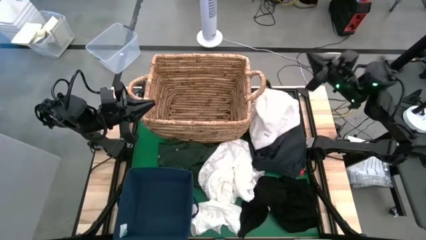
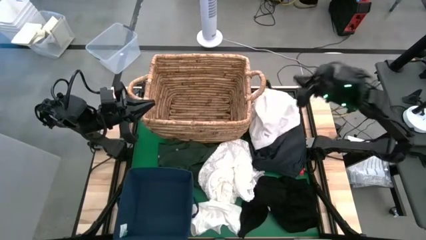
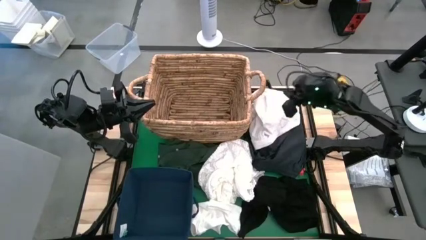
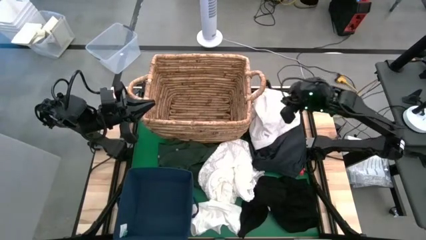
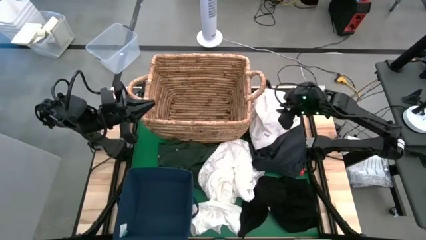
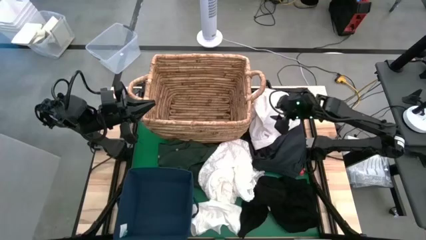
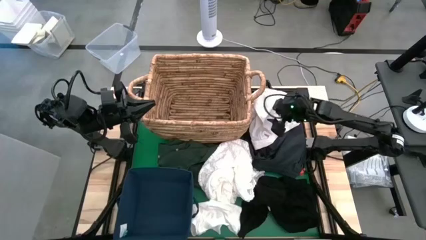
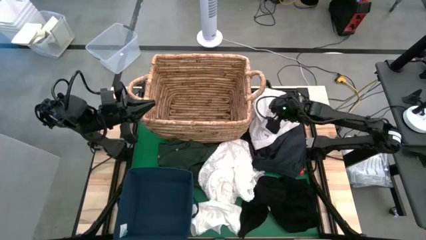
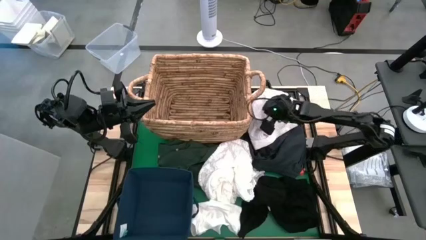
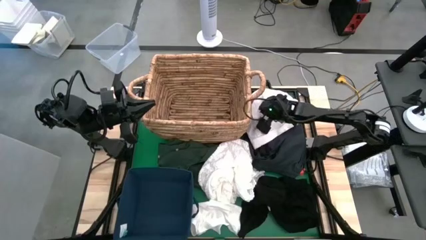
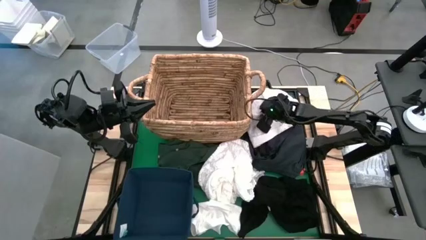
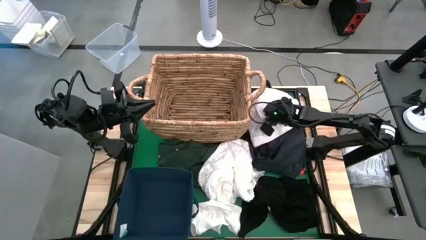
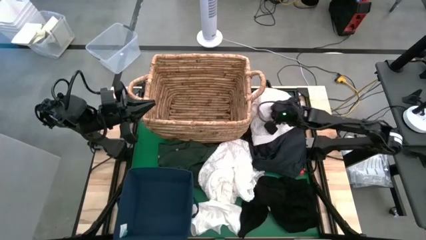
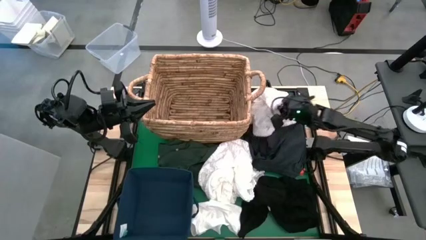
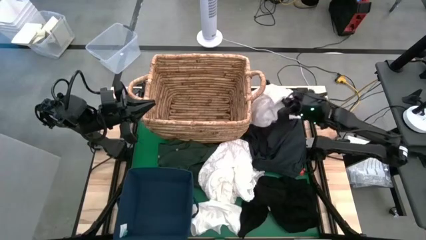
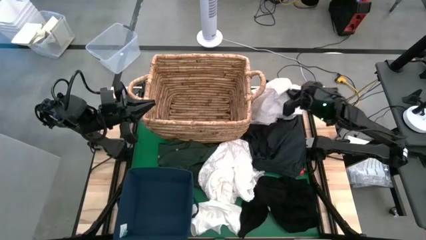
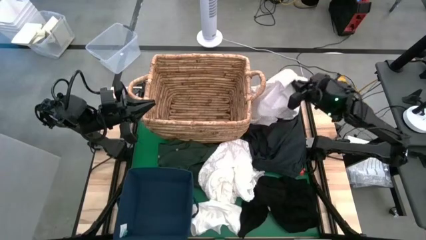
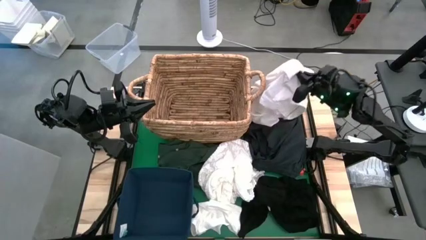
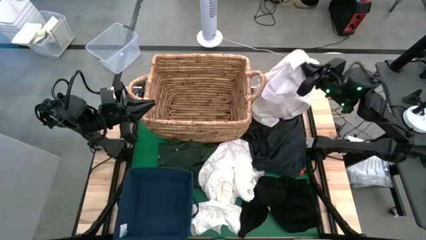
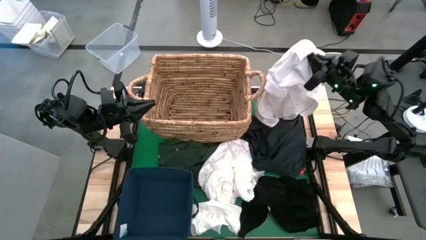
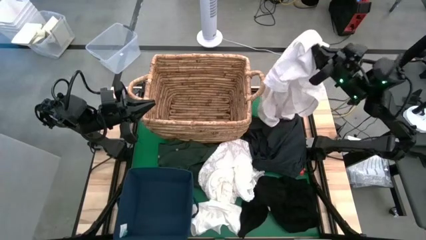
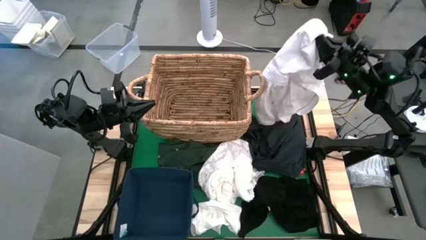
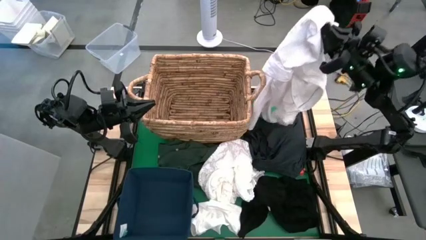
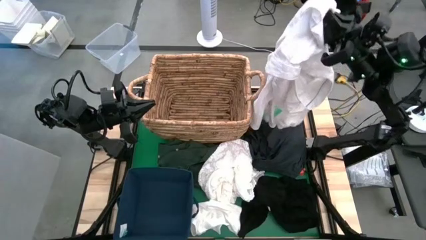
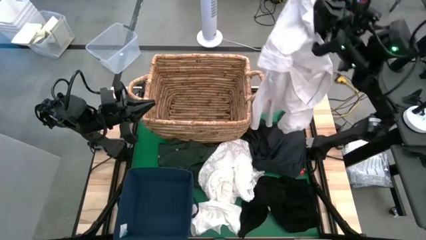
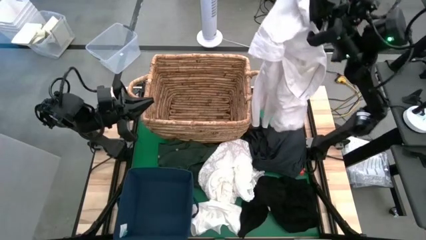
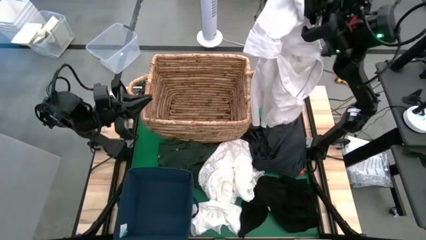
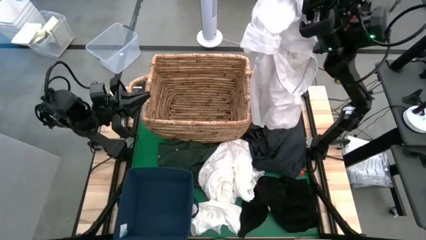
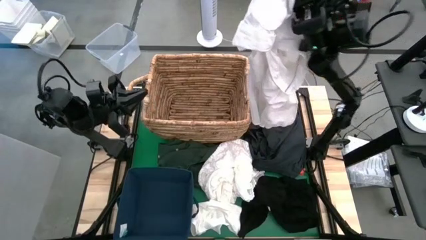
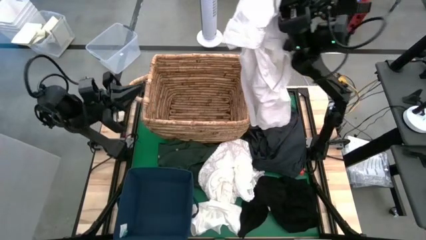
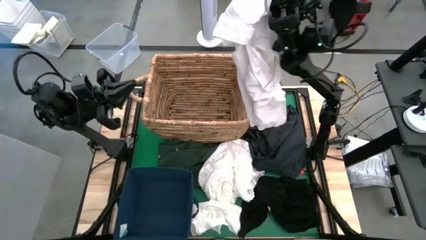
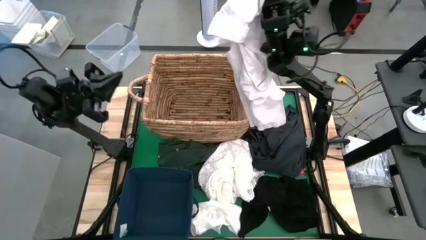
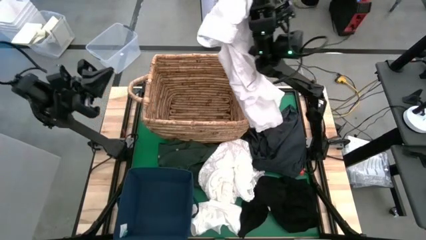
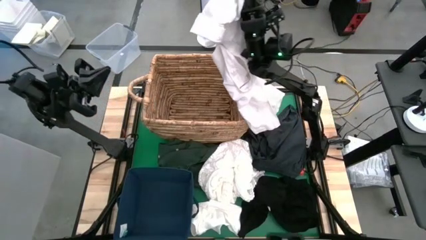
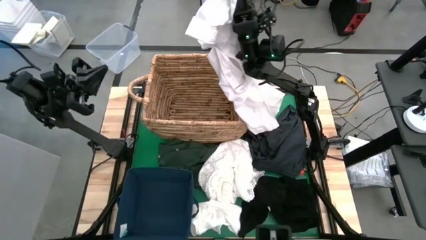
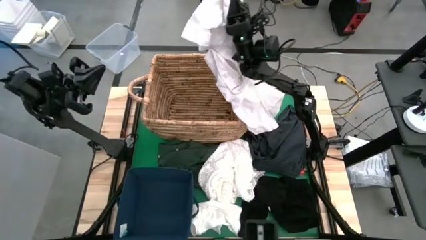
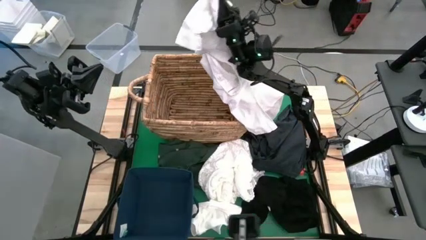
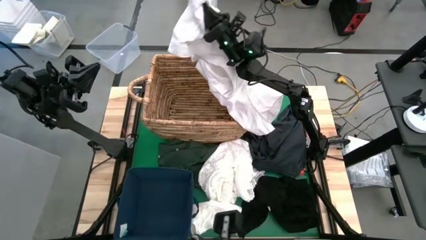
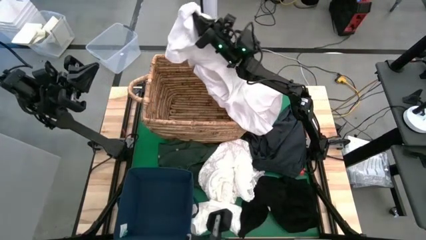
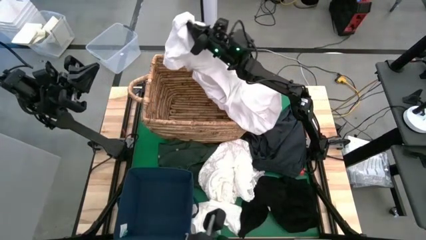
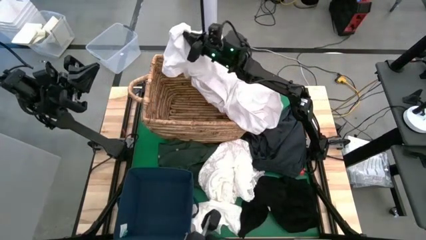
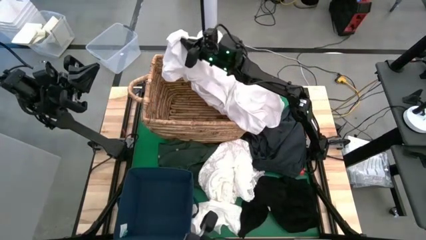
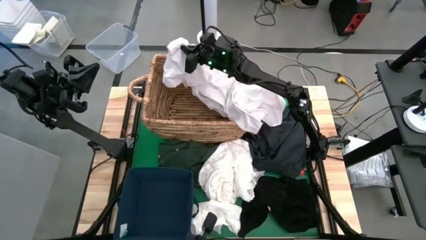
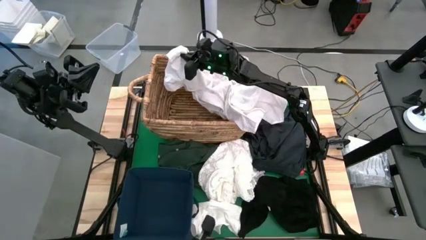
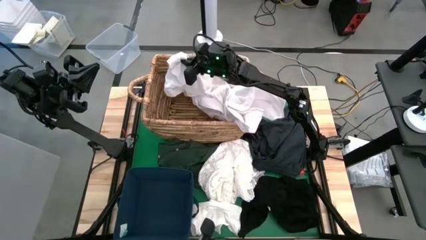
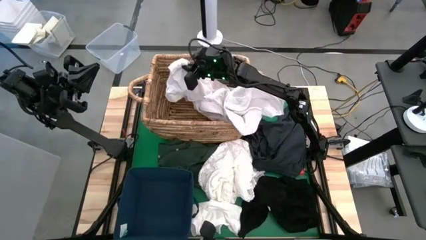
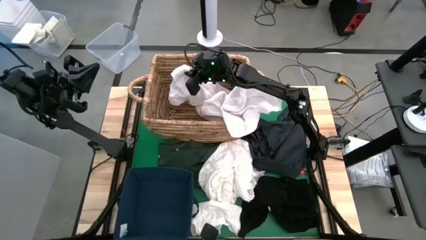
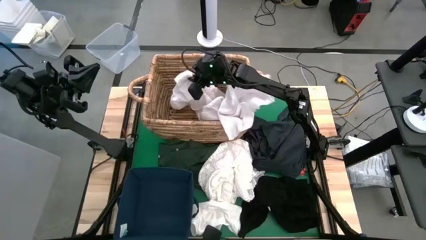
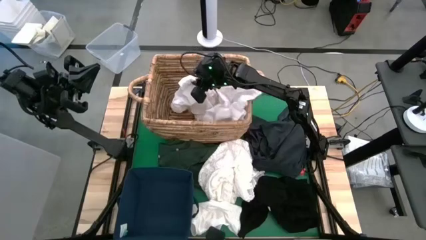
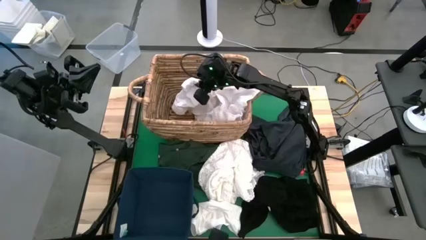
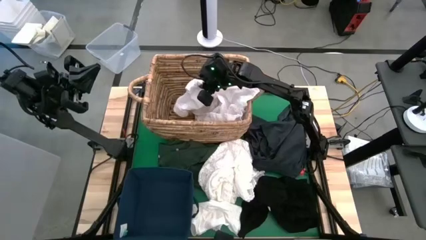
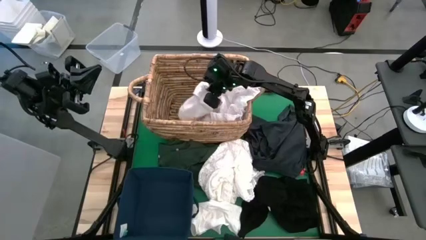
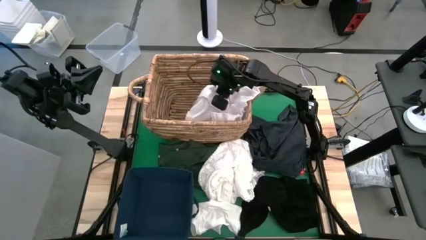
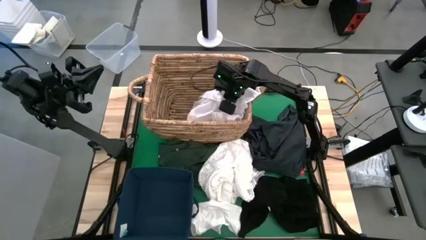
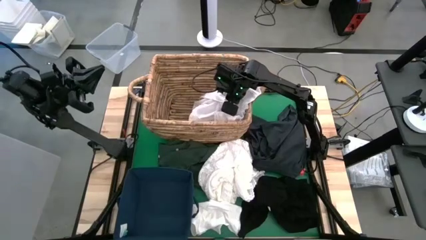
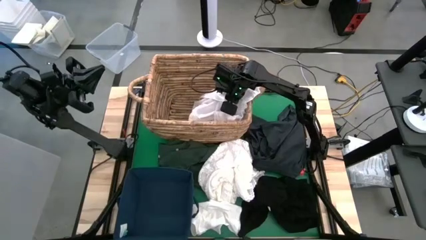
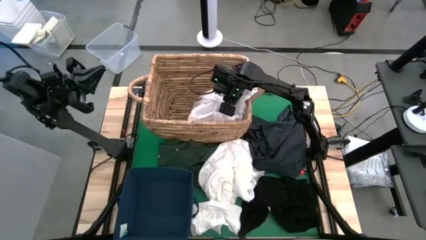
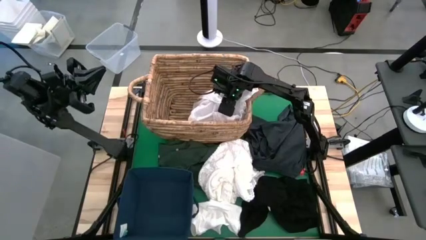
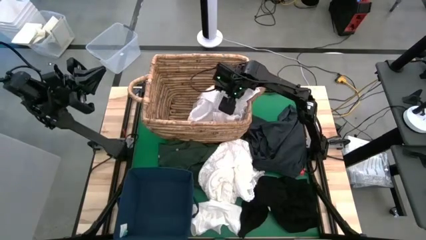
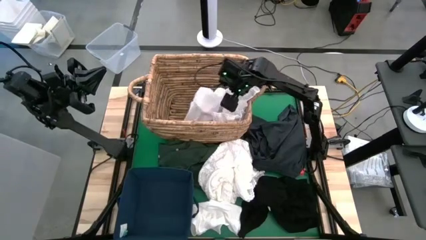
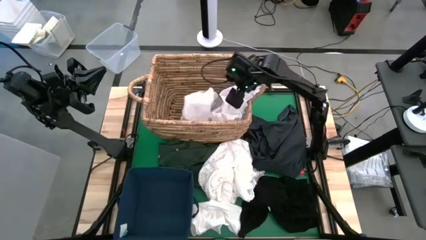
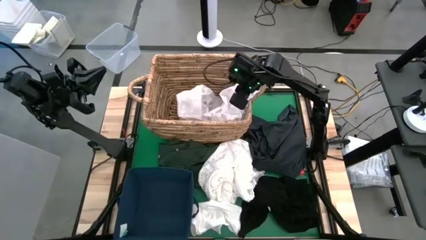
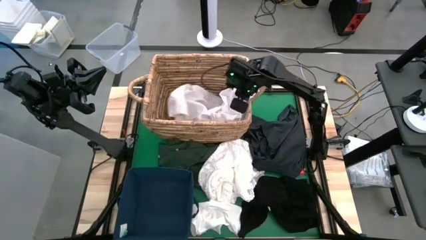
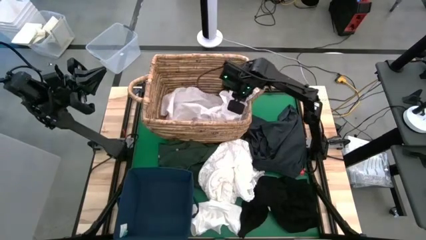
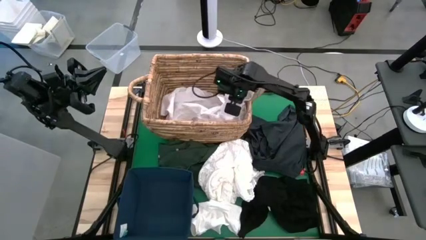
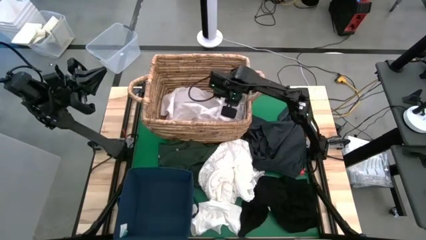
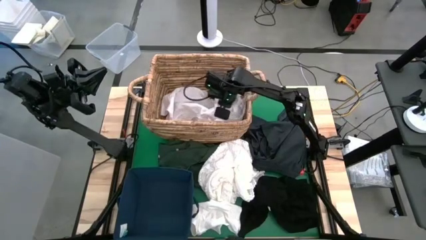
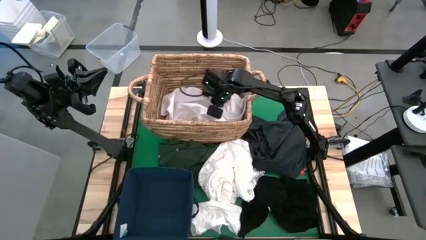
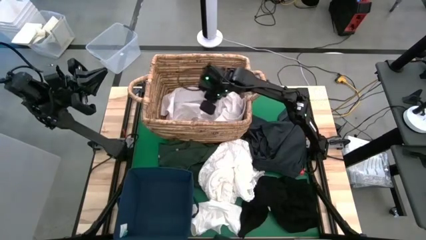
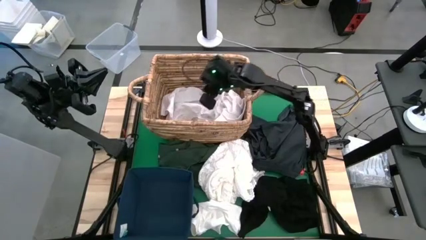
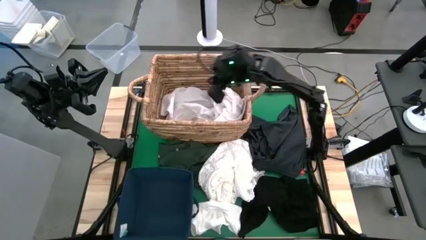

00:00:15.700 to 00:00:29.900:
Put the white shirt into the laundry basket
